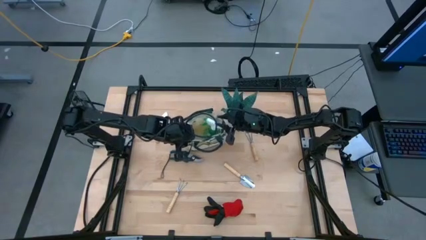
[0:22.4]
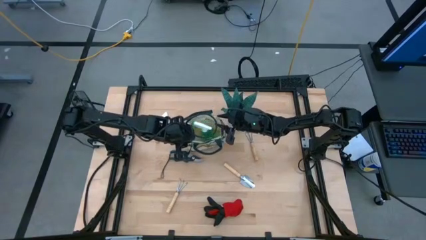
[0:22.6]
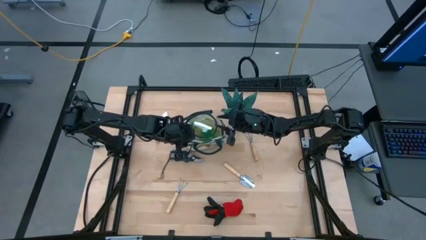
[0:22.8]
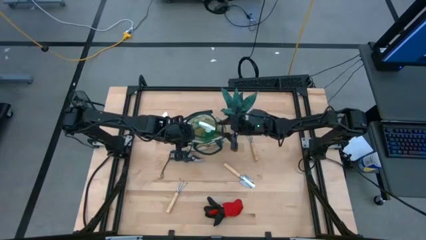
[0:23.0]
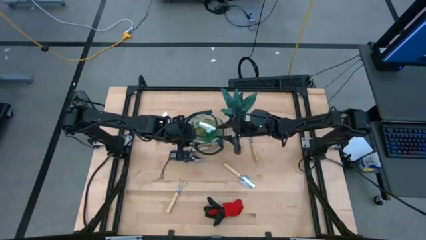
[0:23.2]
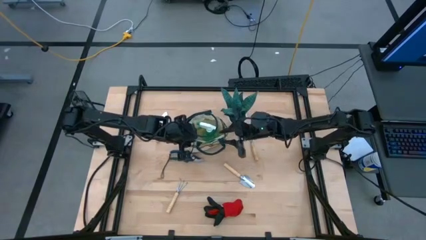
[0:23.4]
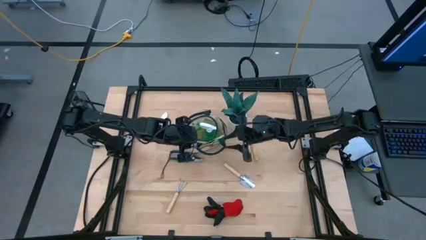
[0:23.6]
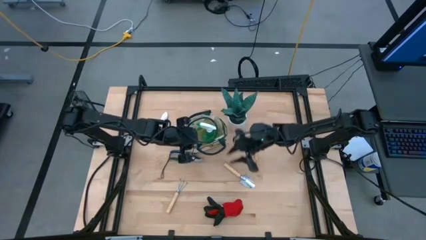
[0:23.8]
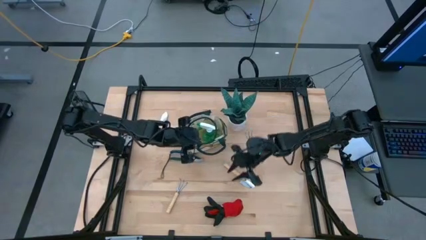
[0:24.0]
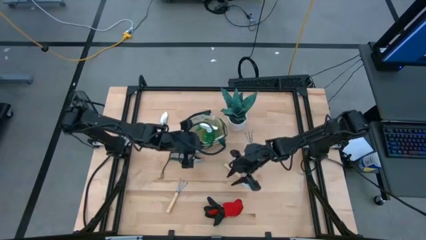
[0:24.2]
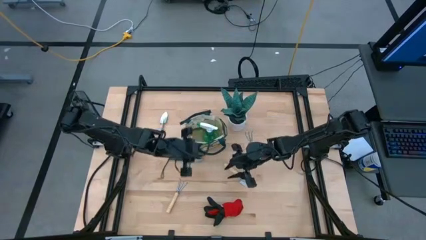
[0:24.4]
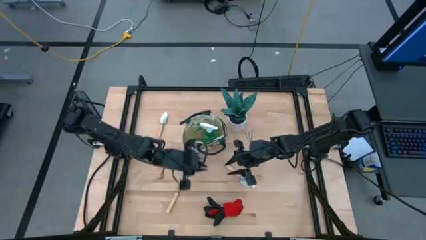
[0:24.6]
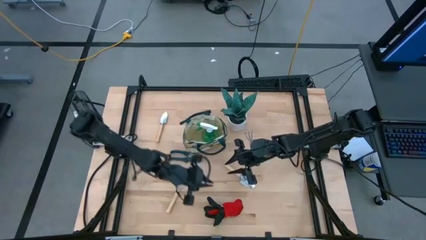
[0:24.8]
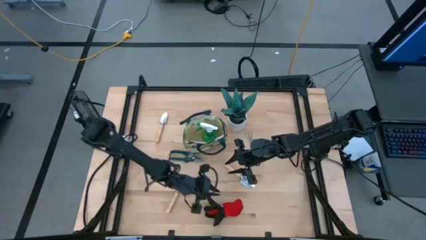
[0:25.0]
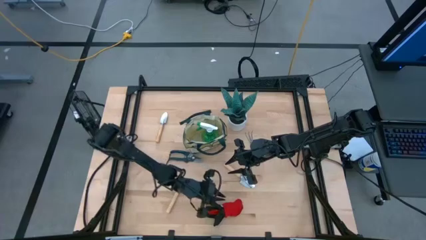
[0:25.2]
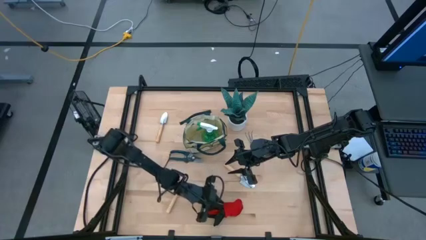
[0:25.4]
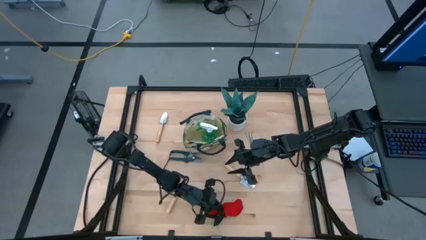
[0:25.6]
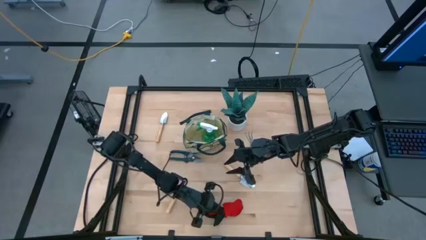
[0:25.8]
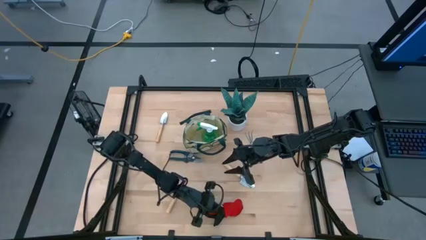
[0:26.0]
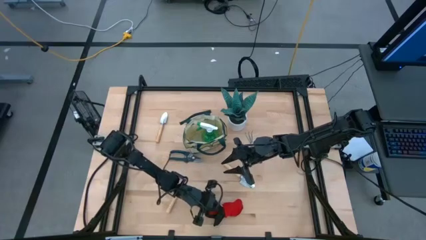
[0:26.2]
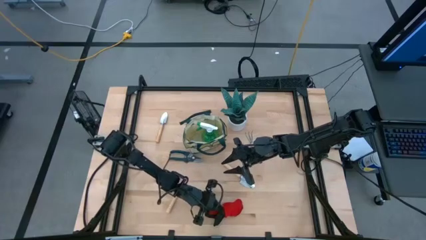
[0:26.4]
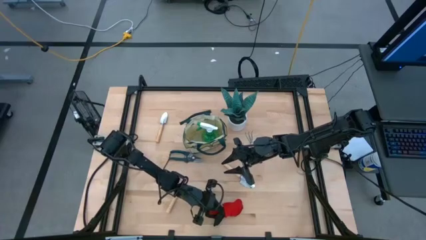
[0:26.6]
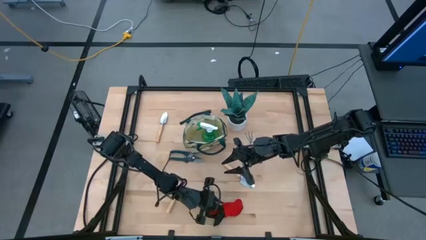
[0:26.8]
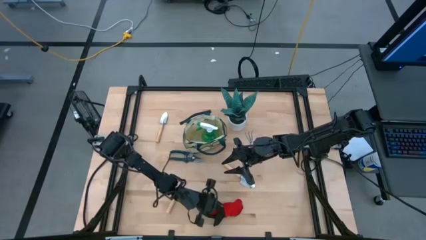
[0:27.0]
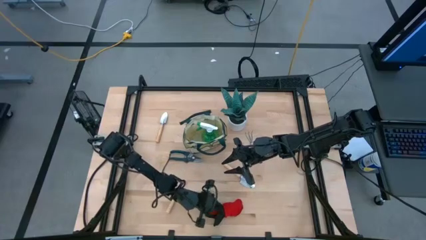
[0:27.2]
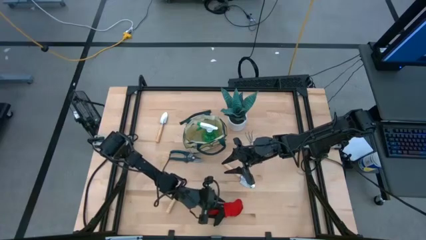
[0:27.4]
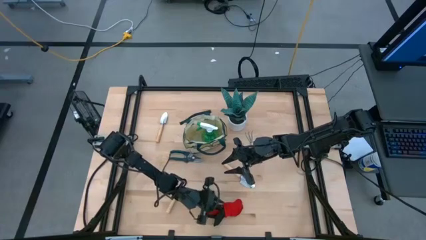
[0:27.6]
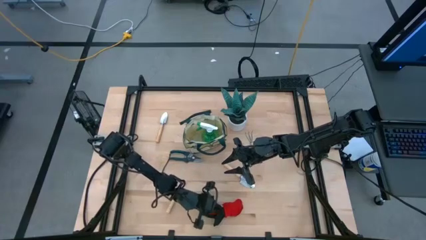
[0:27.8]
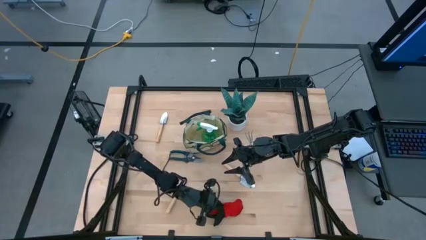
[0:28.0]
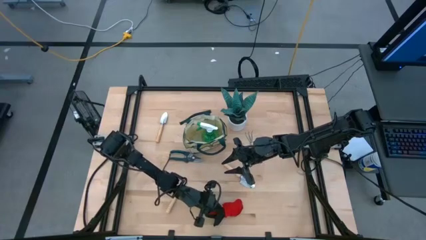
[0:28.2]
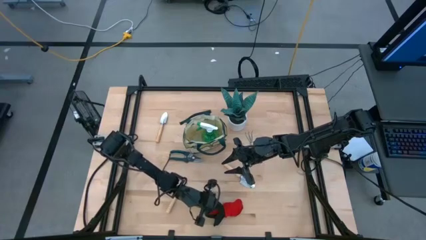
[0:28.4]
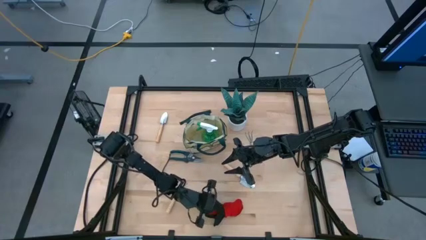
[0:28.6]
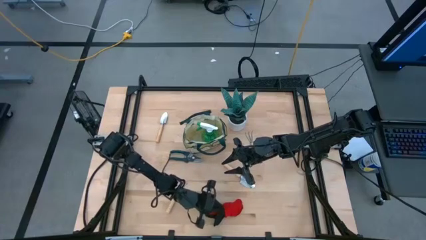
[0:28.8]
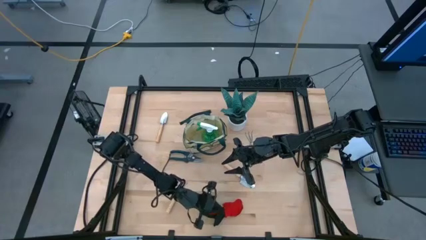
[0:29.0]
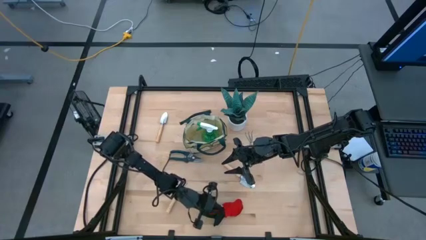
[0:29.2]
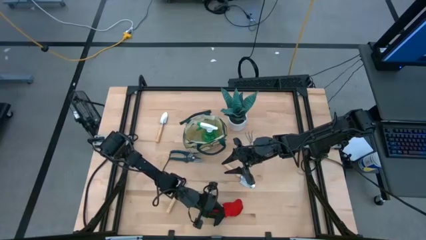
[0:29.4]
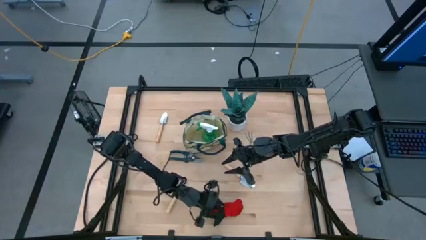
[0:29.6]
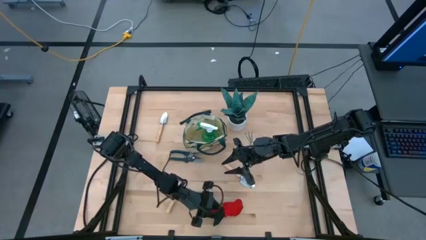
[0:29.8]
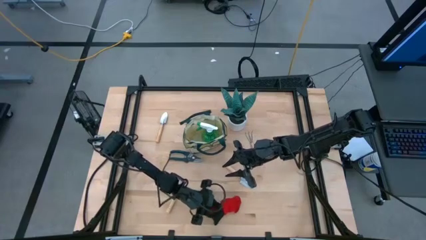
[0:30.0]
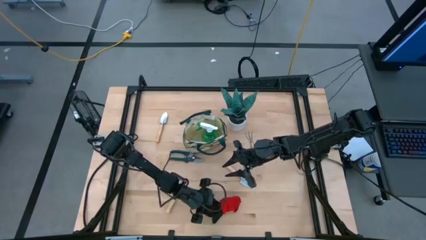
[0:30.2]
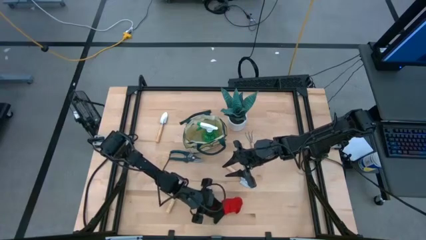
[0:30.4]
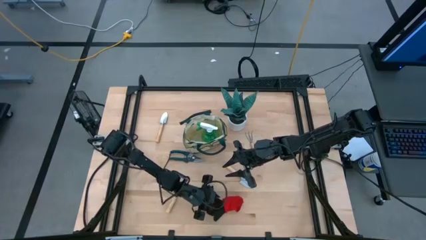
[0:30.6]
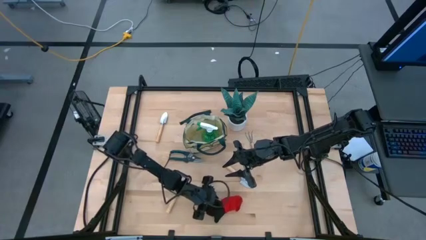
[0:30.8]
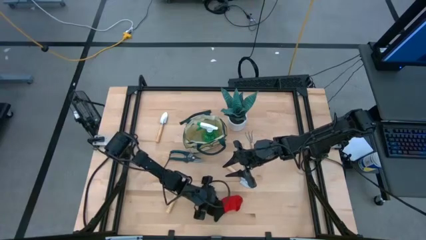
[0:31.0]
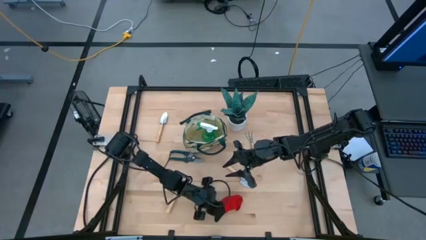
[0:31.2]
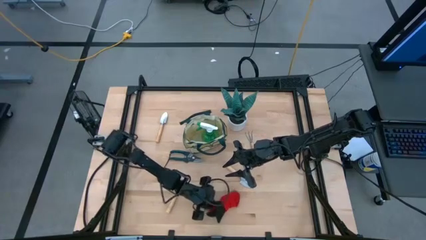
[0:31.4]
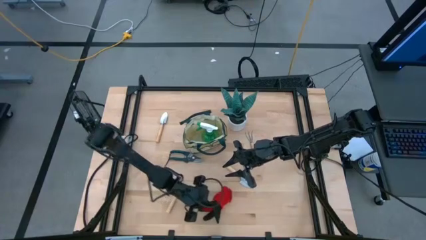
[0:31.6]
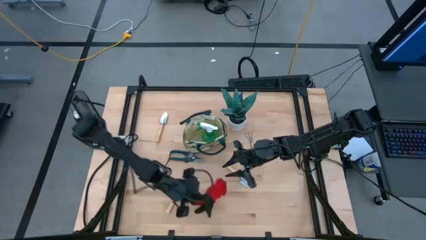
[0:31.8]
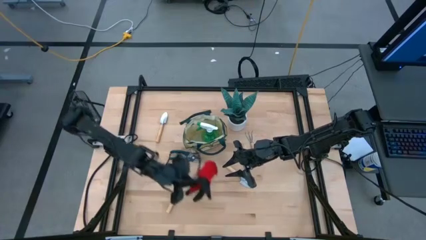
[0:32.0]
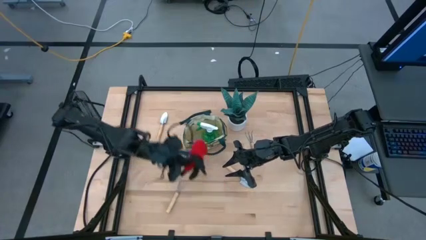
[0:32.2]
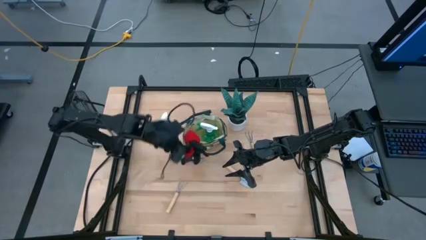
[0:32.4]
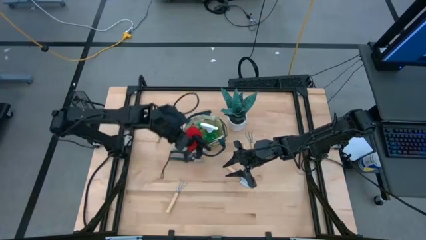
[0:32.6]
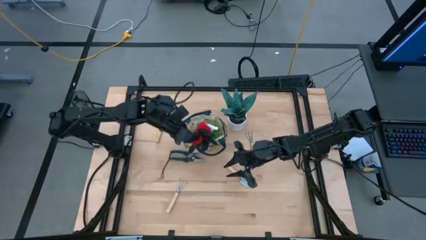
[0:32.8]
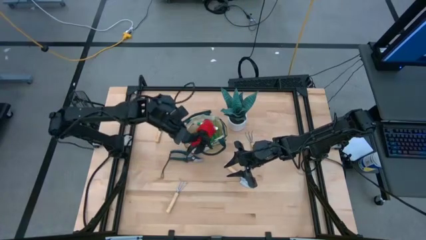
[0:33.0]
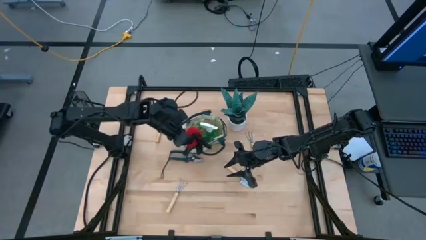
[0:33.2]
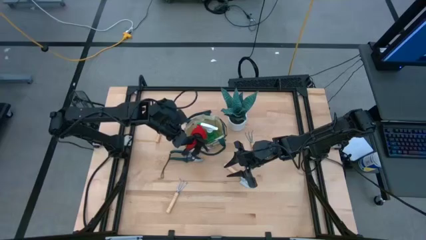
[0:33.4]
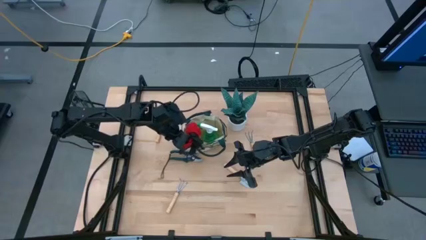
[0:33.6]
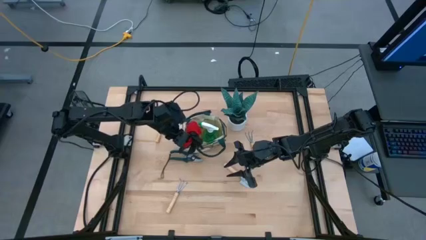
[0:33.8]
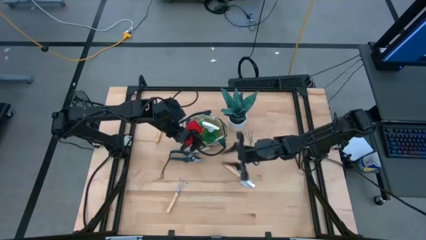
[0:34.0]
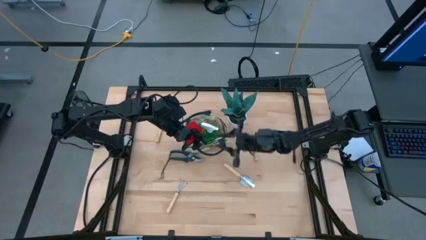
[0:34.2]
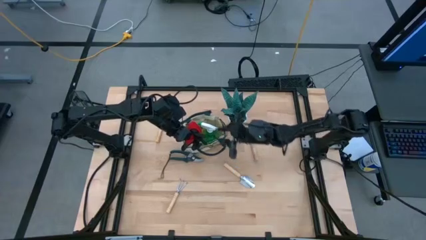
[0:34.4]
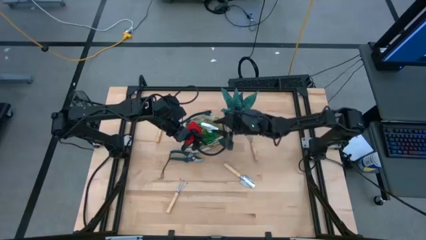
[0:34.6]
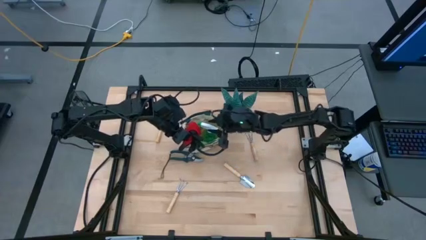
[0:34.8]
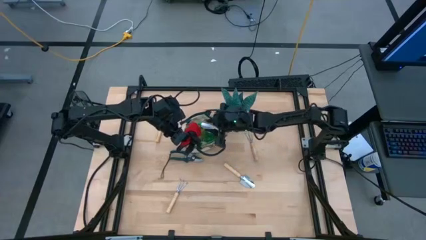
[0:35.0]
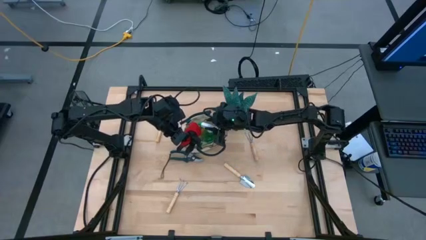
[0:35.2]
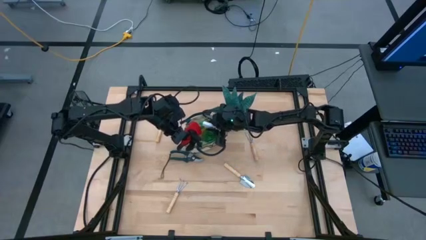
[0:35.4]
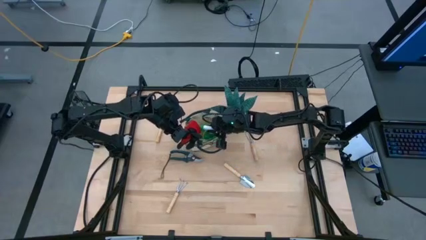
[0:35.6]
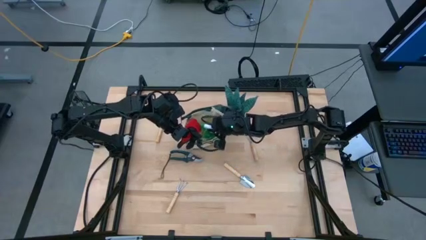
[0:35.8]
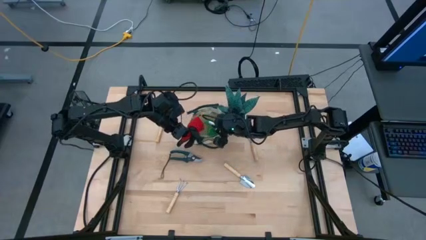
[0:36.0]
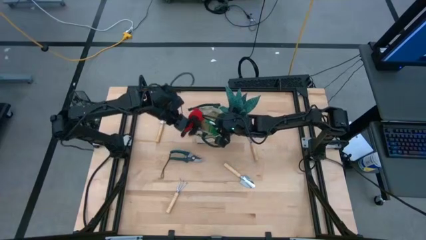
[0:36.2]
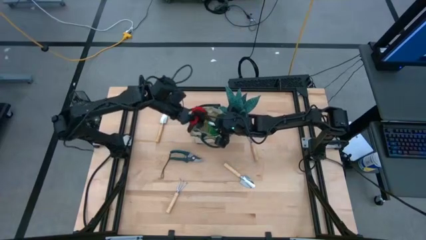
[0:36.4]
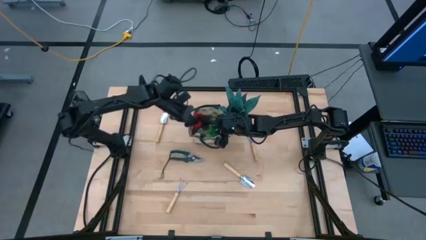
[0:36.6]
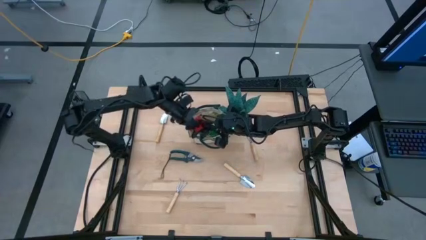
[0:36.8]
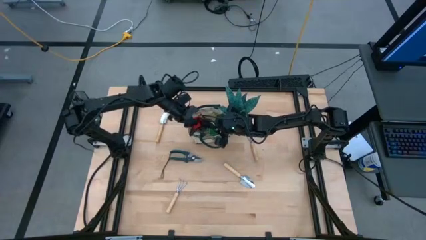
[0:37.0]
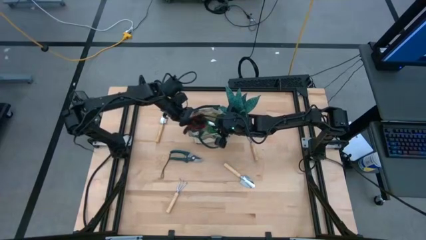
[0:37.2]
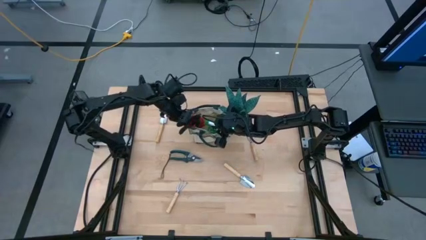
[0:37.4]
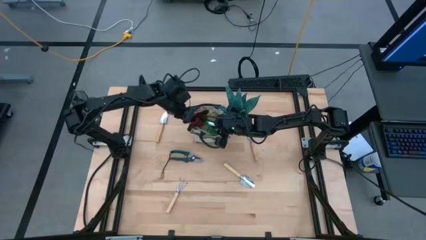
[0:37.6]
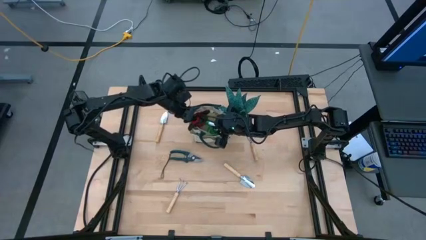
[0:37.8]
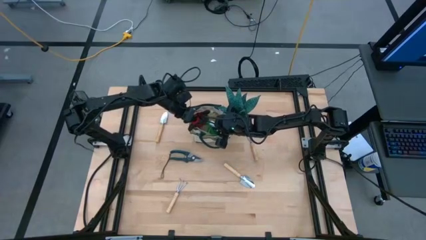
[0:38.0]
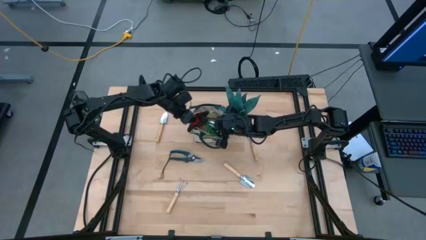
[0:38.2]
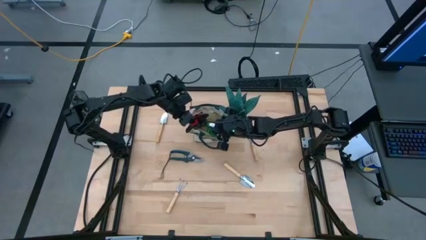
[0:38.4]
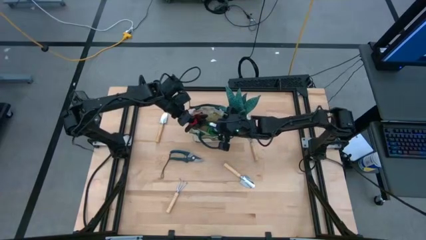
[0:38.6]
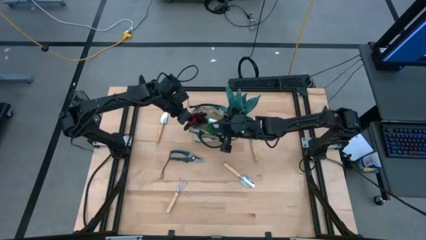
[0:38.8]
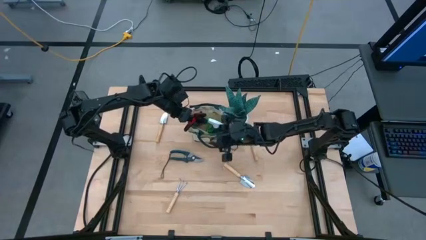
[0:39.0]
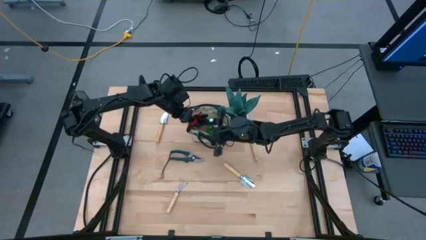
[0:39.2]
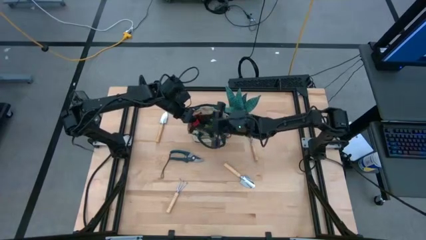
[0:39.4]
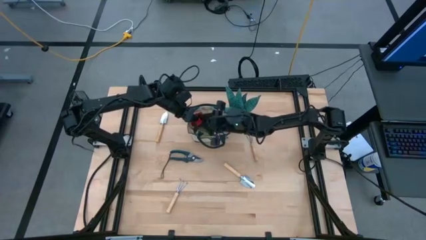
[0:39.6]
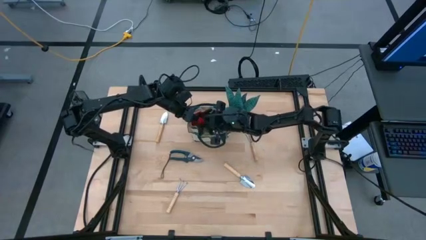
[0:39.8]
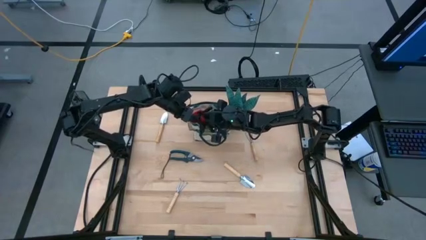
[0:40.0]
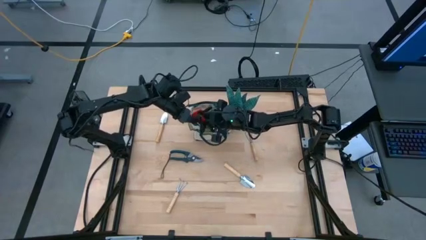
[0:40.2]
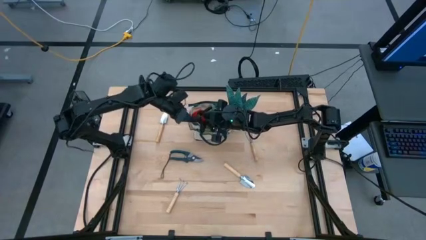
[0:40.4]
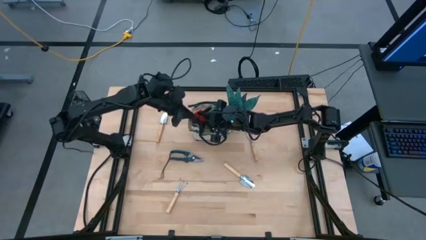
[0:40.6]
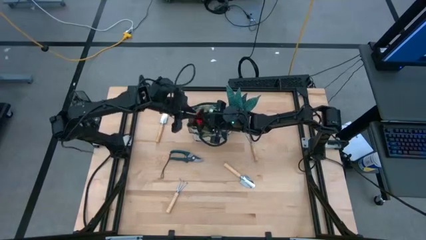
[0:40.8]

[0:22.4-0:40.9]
Task: Pick & Place Garden tools in Gardening bag
Put the red gloves into the white gardening bag
